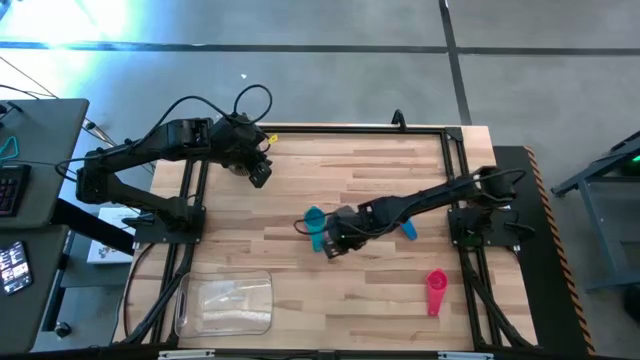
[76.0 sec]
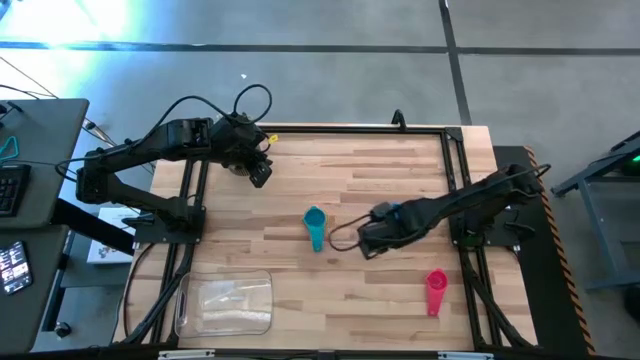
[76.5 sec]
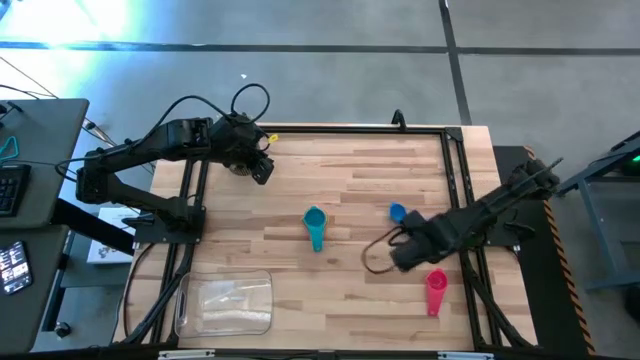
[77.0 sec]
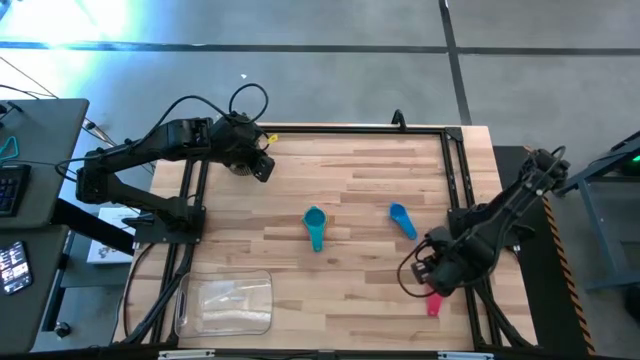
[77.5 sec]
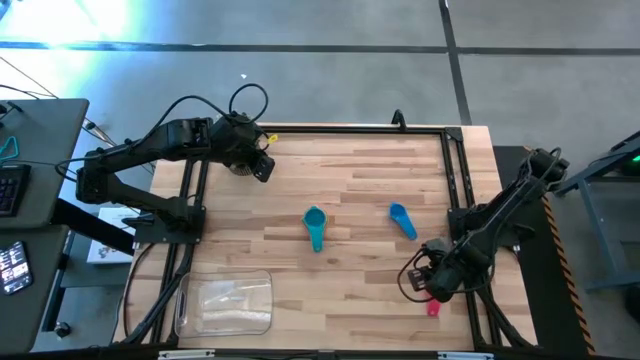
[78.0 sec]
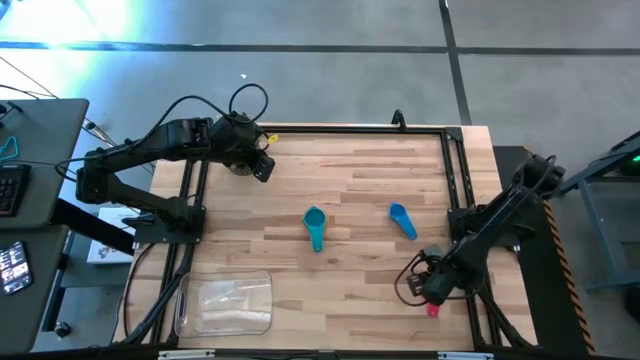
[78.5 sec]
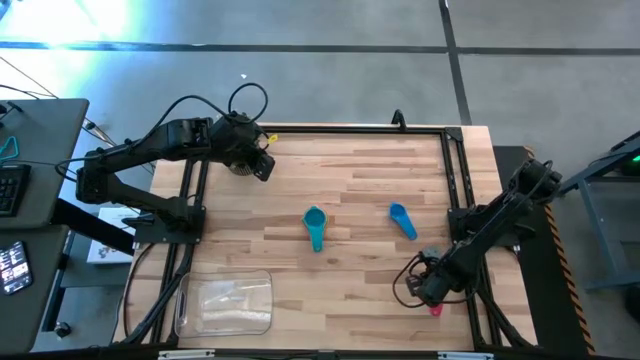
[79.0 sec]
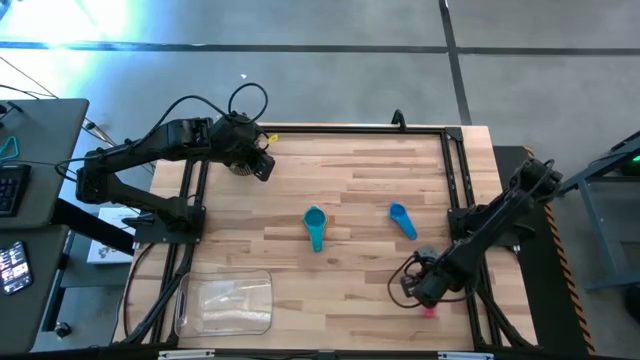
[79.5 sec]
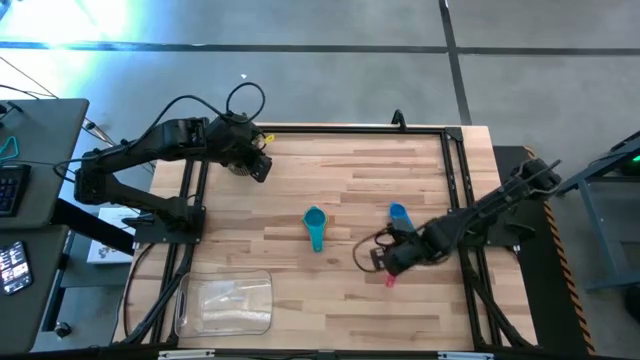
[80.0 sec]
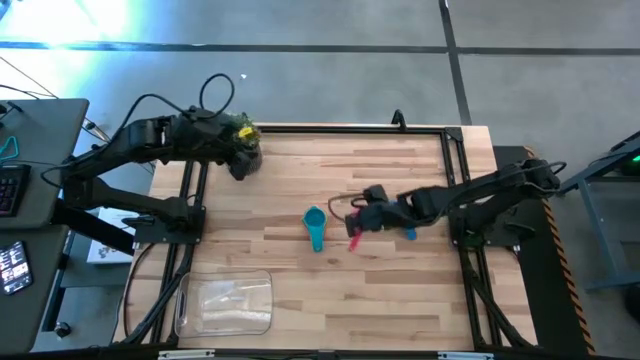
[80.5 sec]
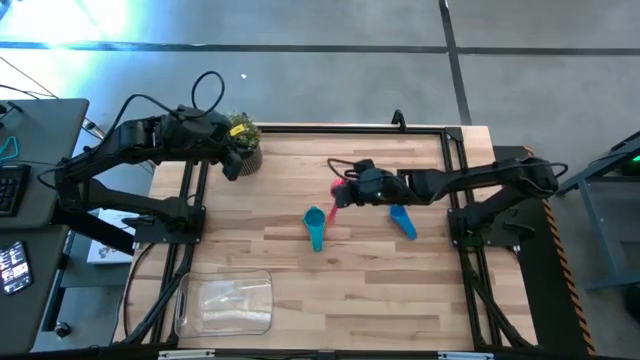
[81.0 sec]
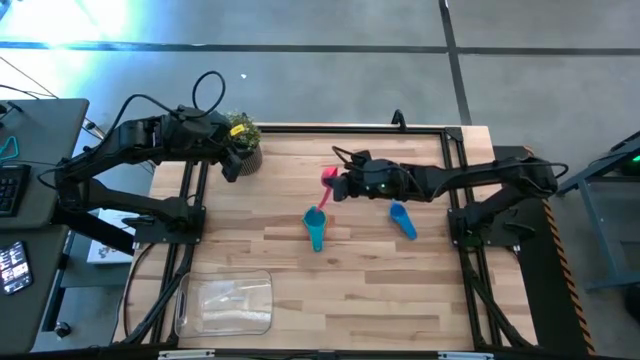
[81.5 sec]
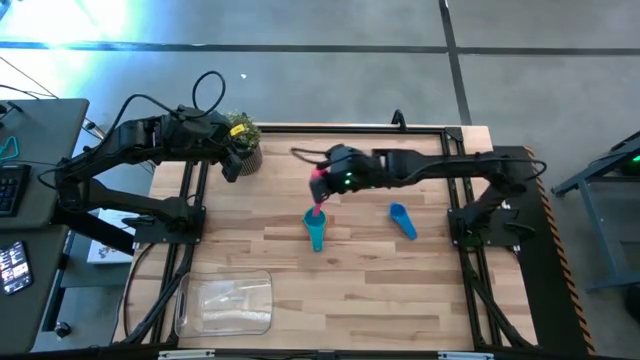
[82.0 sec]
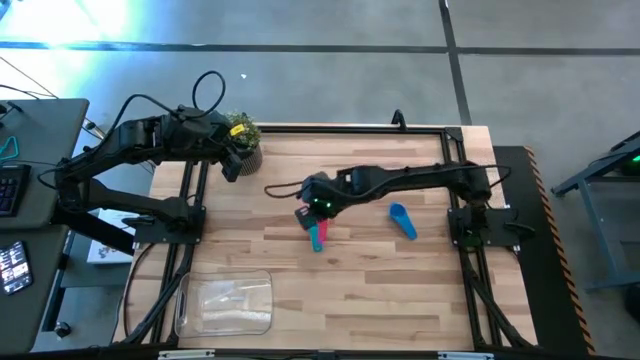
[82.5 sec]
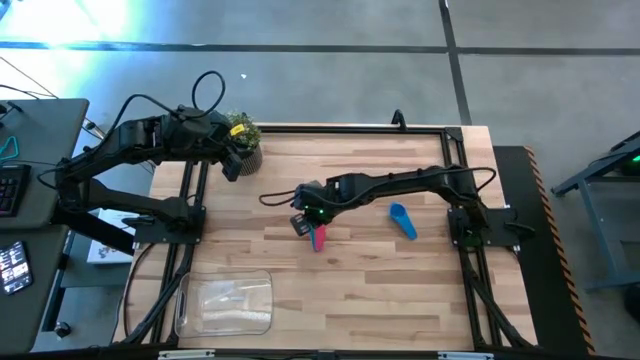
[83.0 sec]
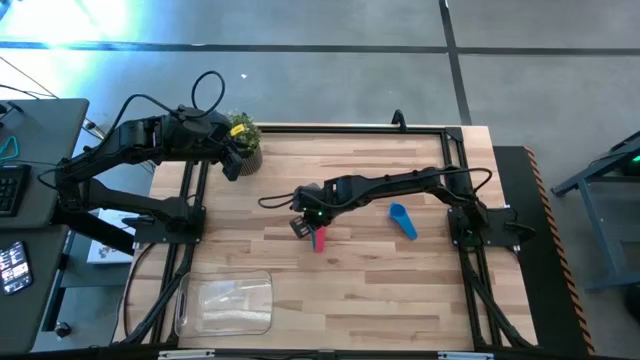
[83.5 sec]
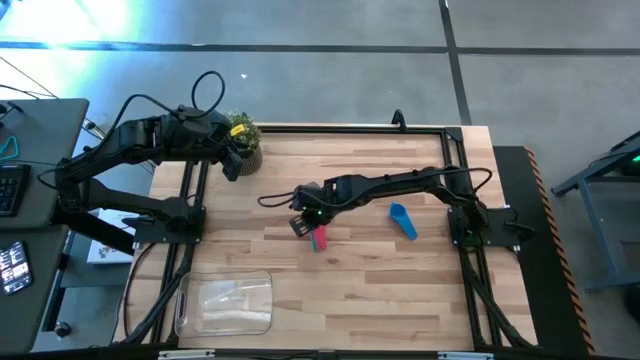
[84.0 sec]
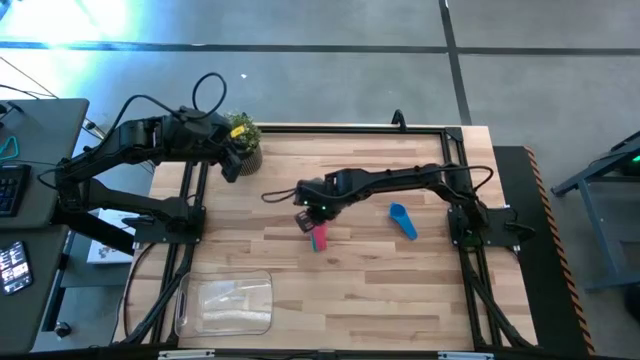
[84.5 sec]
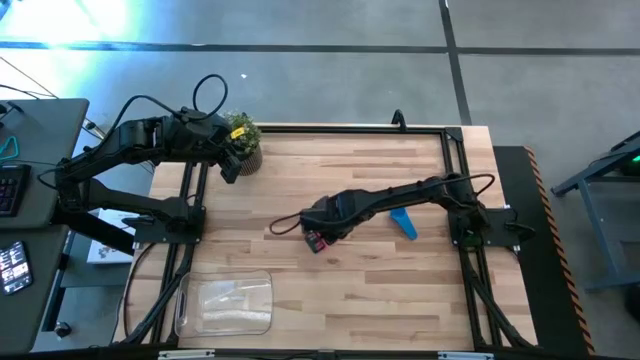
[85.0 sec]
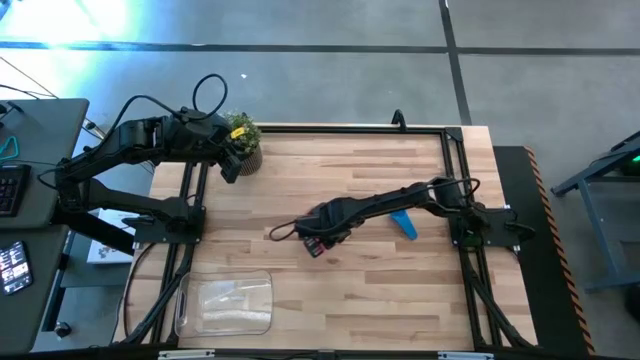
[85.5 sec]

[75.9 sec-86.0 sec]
Task: Nest measuring cups in basket
Stack the red measuring cup on the light blue measuring cup

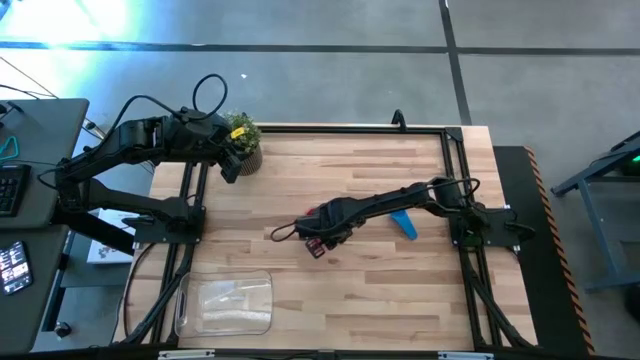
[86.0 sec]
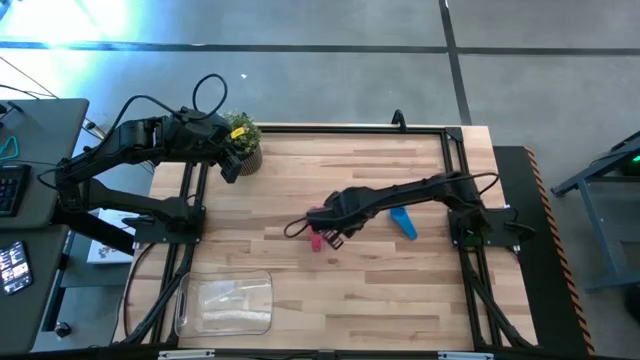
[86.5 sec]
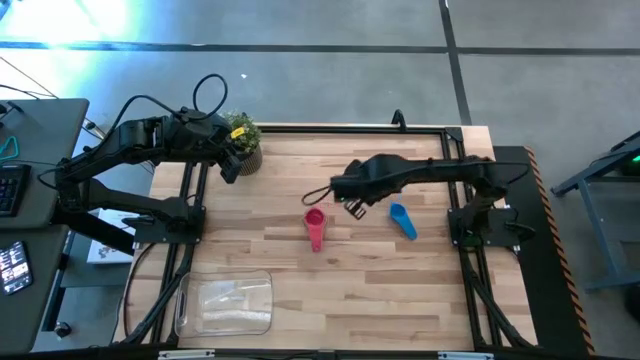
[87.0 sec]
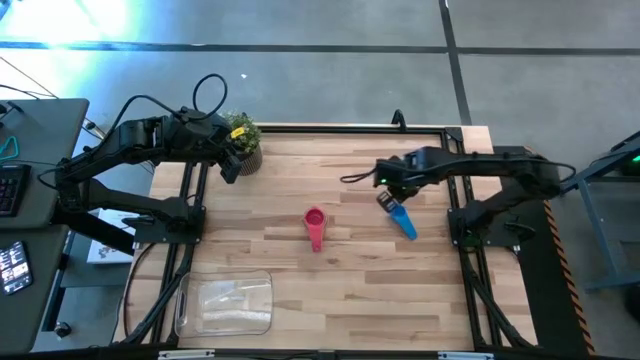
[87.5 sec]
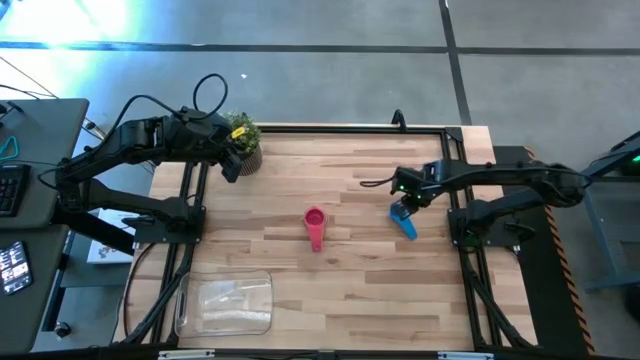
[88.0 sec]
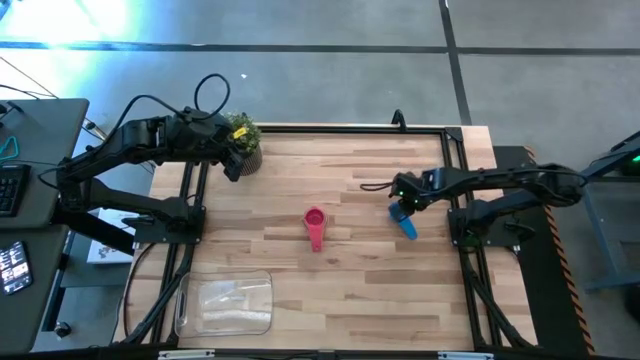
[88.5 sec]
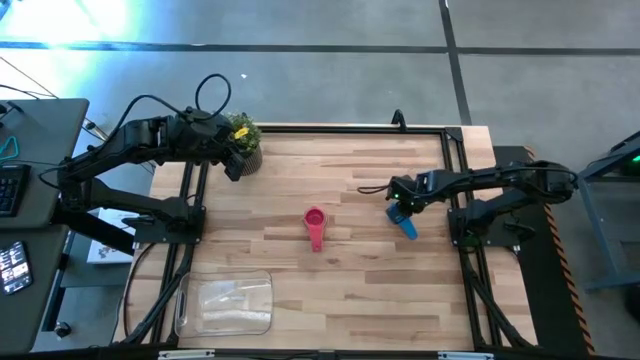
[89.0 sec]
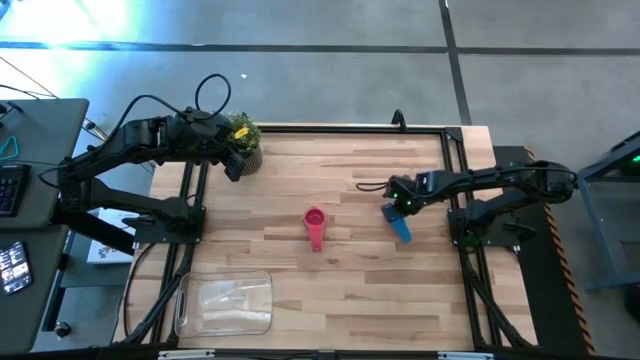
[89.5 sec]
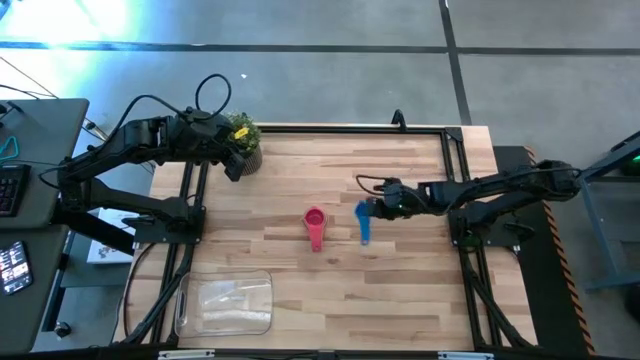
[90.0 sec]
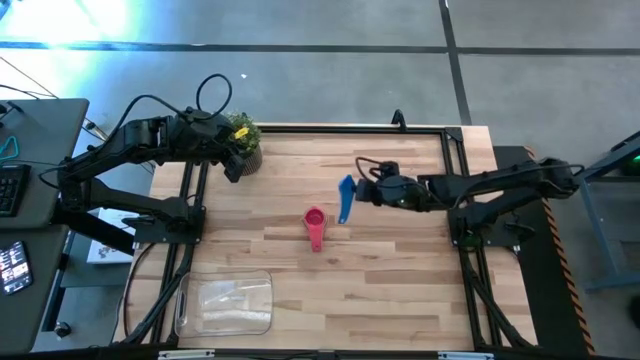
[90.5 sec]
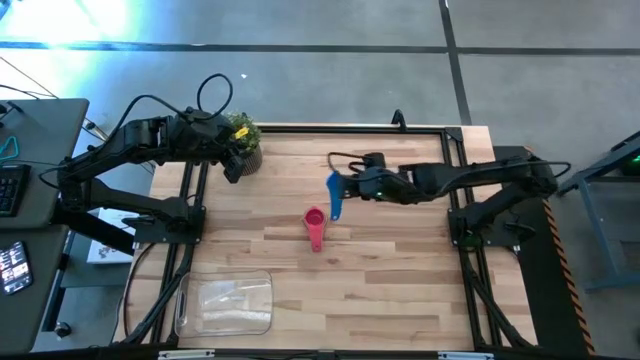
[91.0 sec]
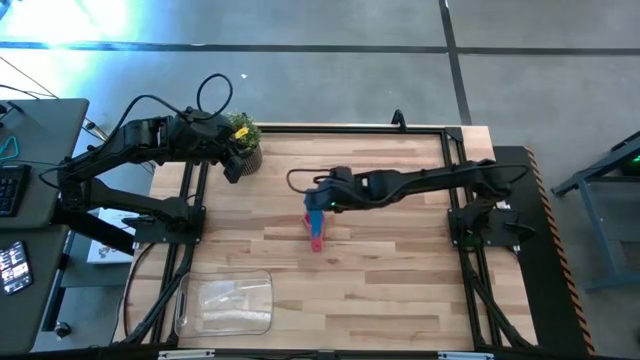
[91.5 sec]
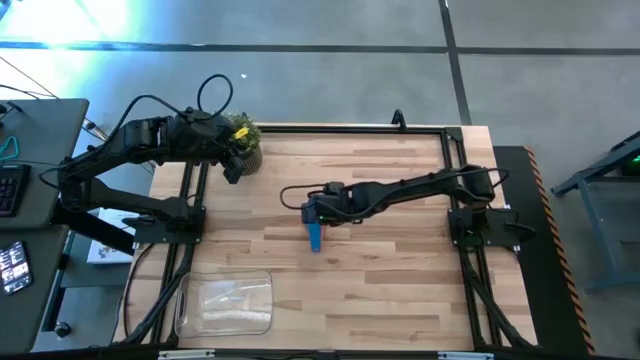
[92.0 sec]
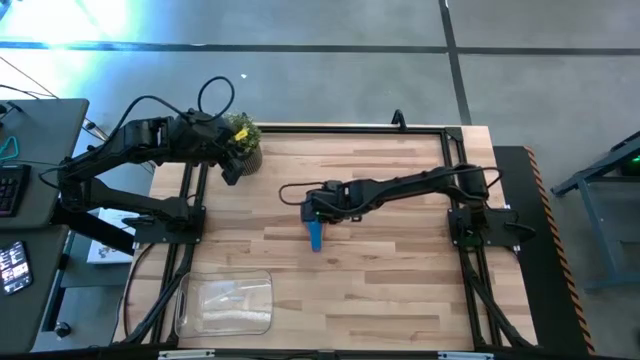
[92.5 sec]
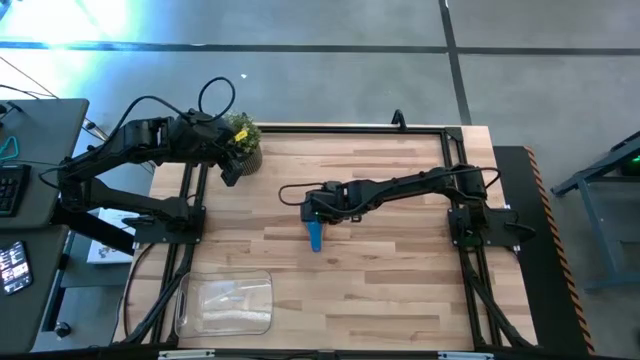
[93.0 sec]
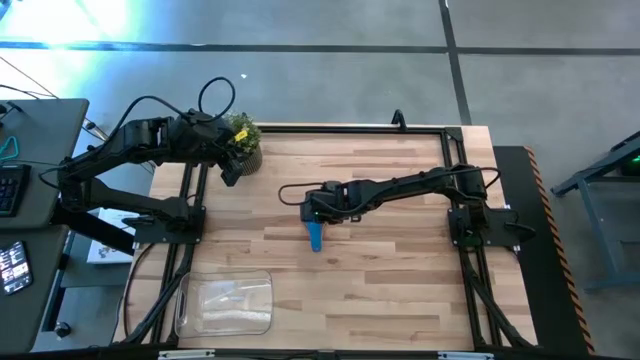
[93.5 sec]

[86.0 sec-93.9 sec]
Stack the blue measuring cup on the red measuring cup

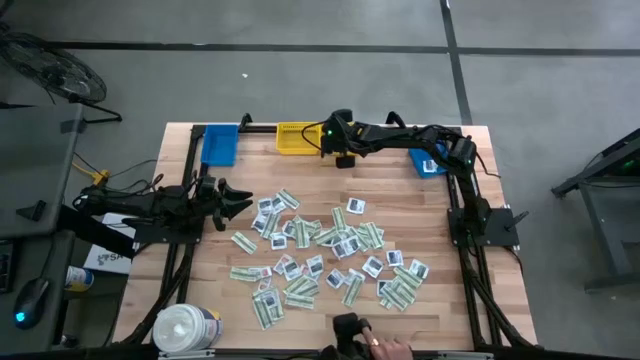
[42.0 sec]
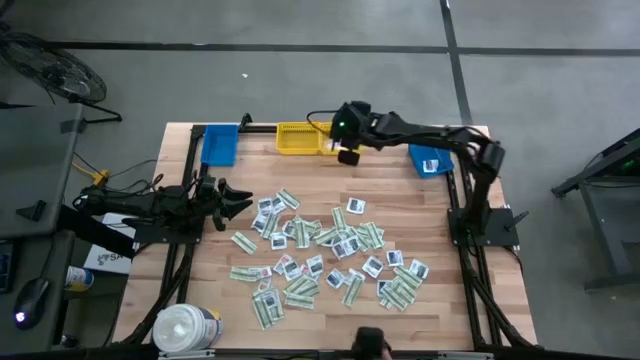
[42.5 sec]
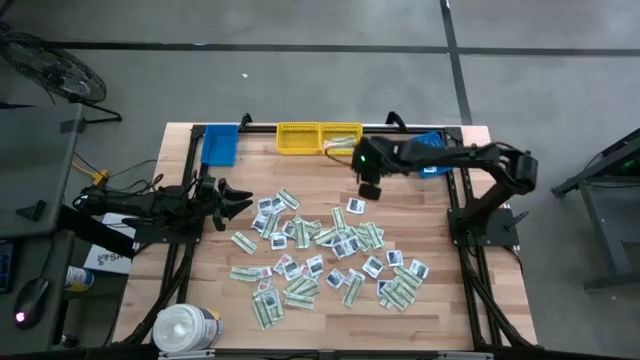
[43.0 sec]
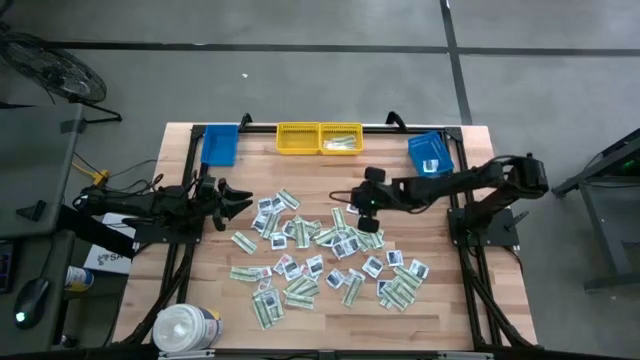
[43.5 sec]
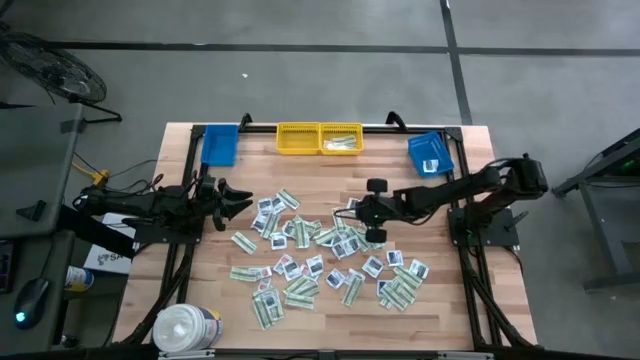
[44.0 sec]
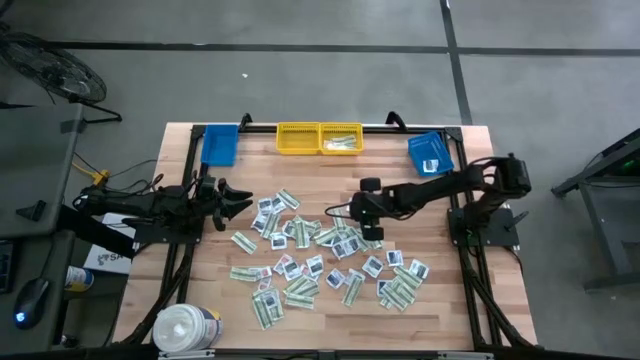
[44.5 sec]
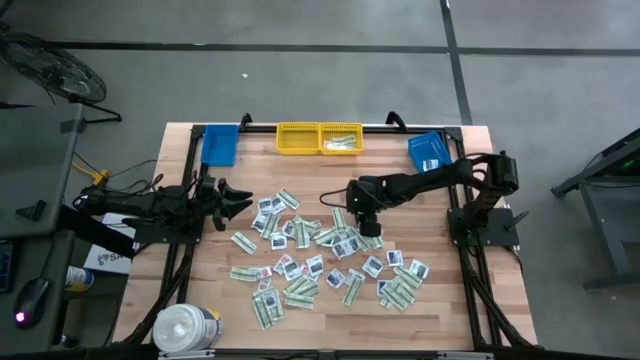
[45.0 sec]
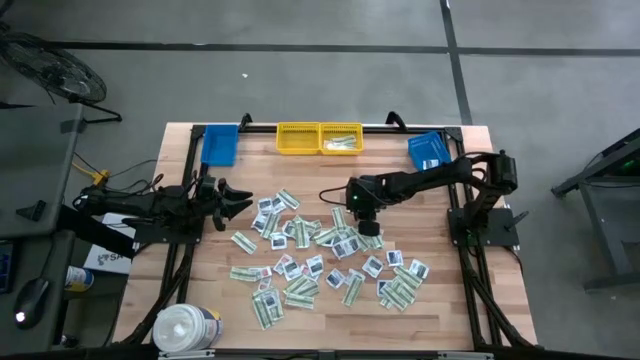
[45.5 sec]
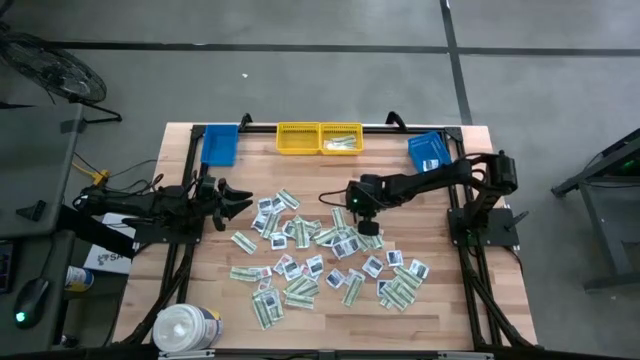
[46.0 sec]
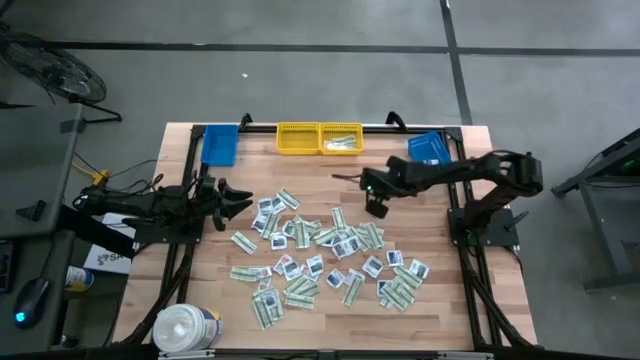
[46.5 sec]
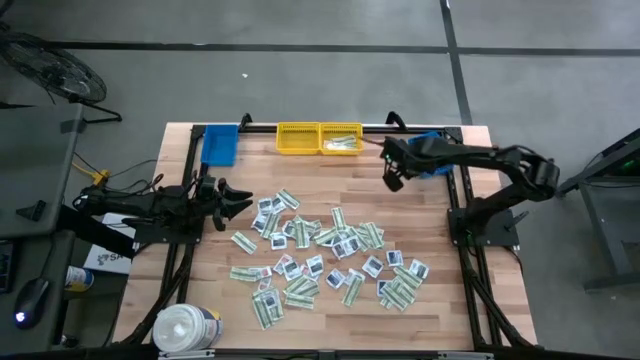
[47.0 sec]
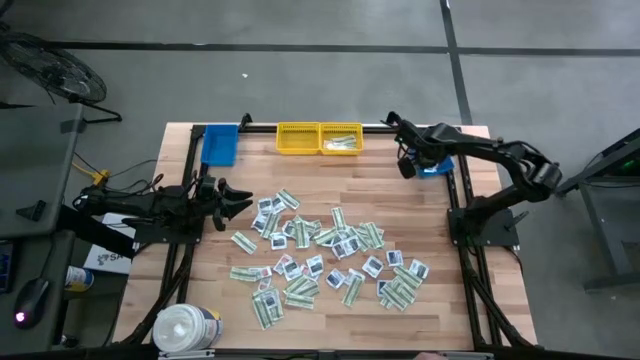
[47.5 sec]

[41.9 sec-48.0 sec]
Task: Pick & Place First Aid Supplies
Put the black towelette pack into the right blue bin
